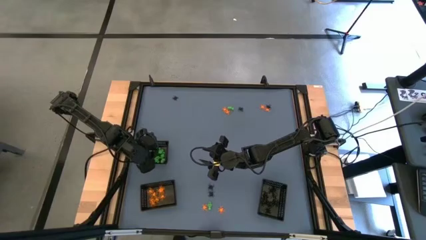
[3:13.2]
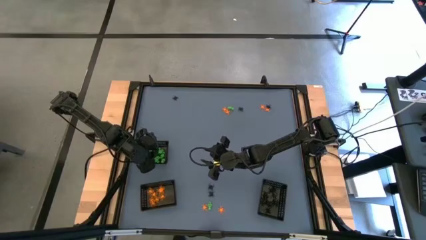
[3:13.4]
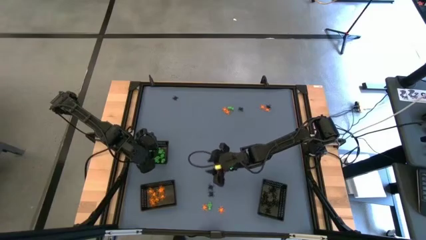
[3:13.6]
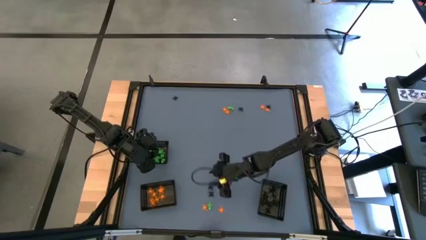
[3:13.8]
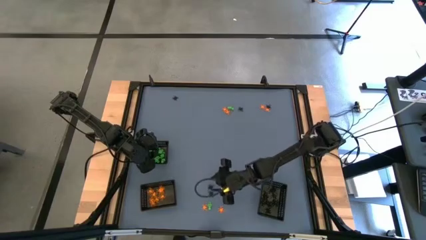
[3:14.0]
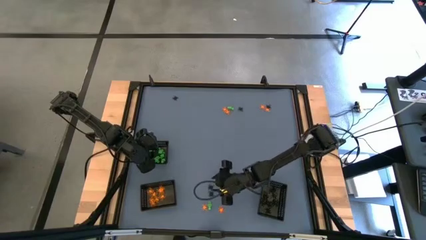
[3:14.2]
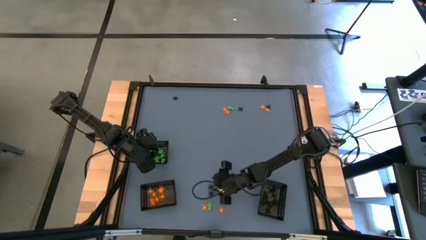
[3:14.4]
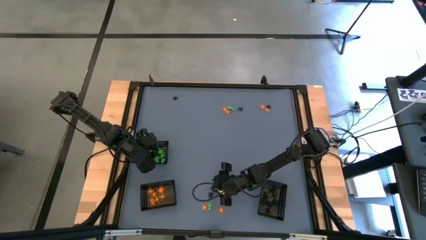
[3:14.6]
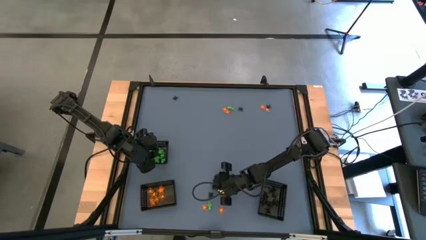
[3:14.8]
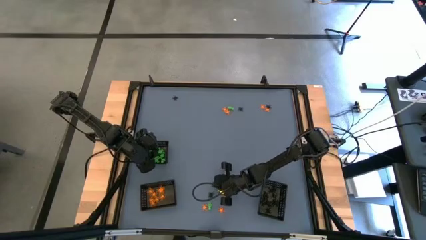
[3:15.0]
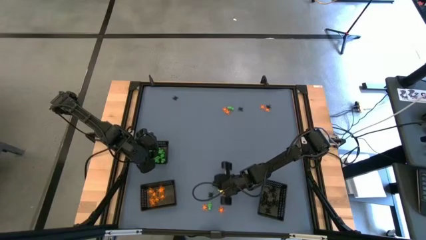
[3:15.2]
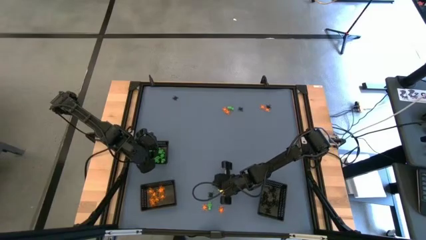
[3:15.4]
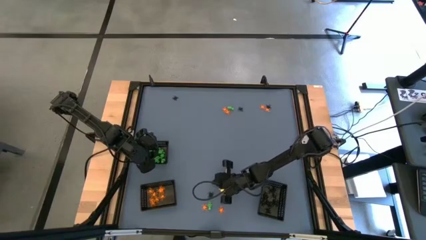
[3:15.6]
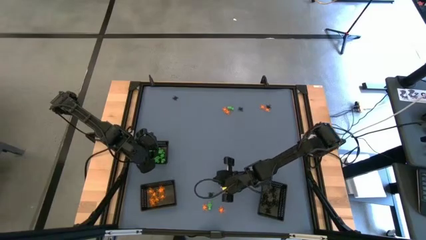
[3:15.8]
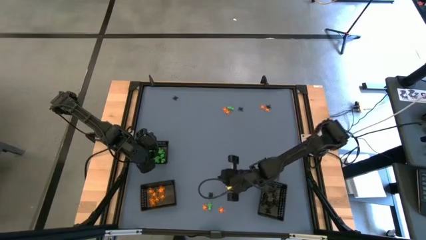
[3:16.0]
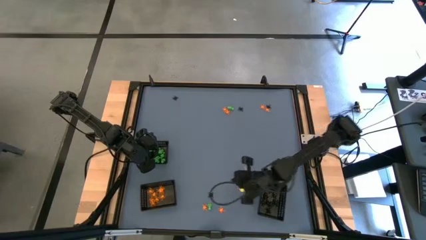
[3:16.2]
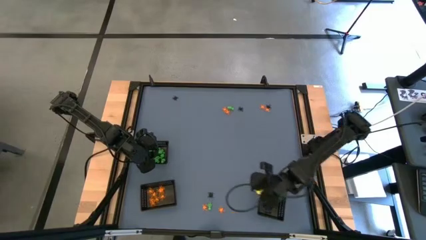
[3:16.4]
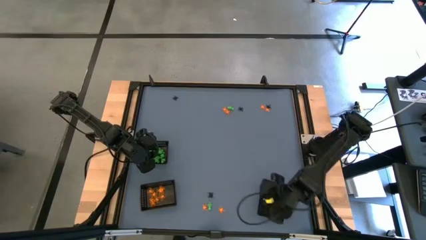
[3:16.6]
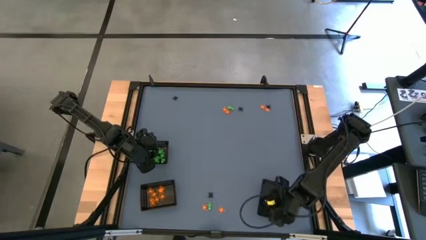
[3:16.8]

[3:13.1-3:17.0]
Task: Sort Halloween decoration
Put the black spider toy into the bottom right black bin

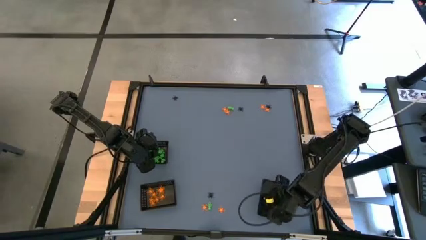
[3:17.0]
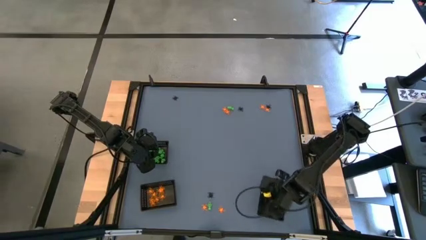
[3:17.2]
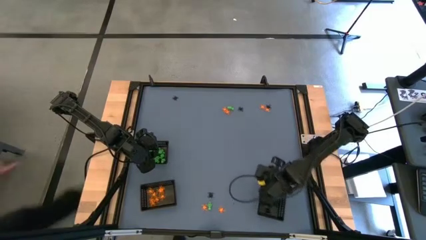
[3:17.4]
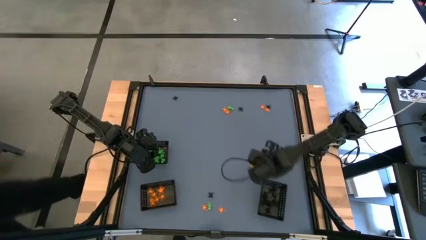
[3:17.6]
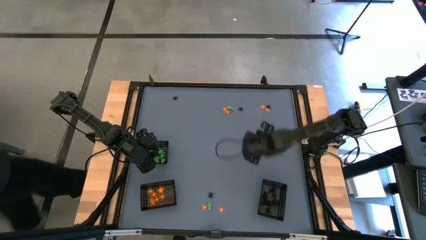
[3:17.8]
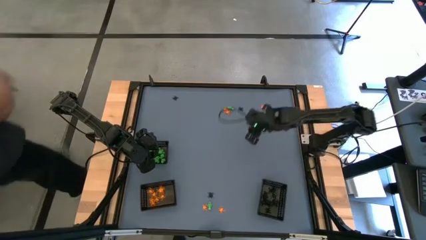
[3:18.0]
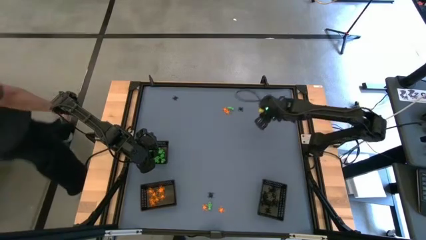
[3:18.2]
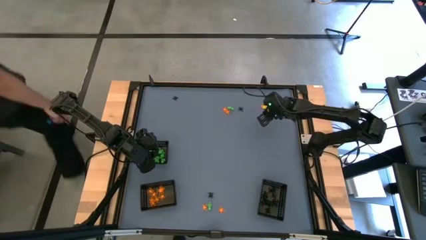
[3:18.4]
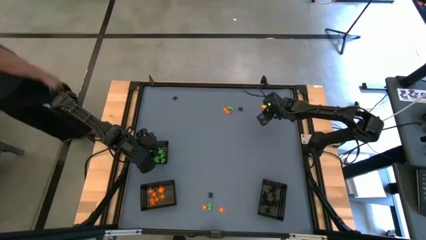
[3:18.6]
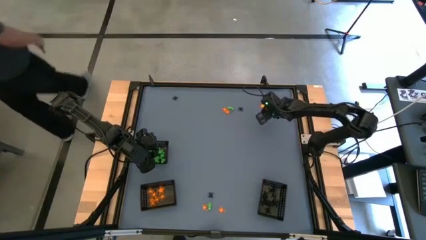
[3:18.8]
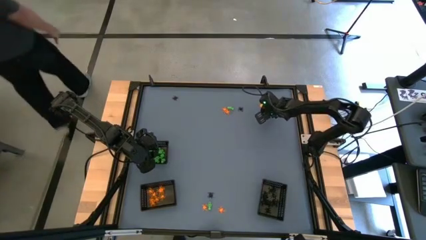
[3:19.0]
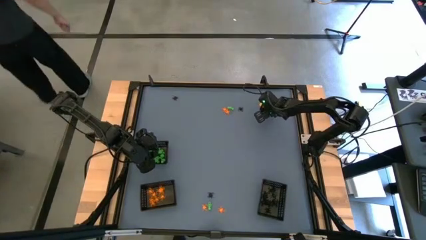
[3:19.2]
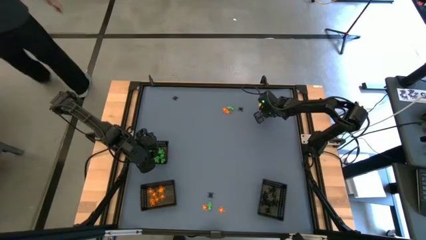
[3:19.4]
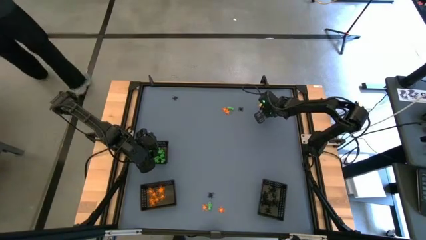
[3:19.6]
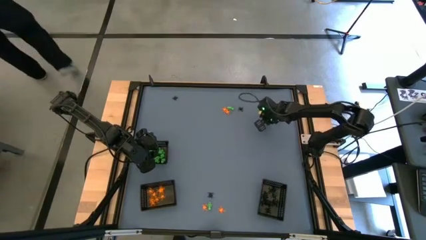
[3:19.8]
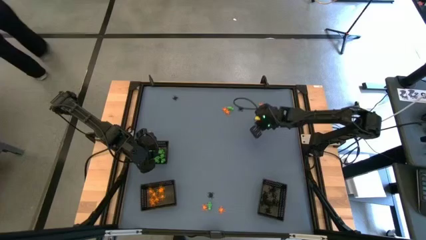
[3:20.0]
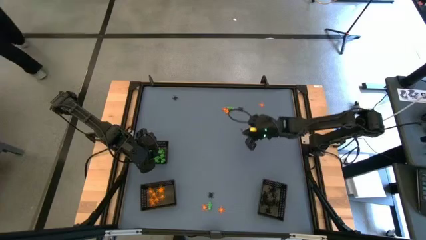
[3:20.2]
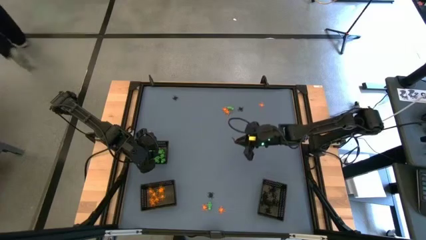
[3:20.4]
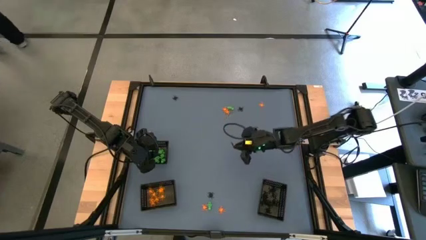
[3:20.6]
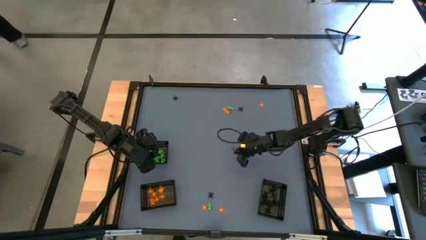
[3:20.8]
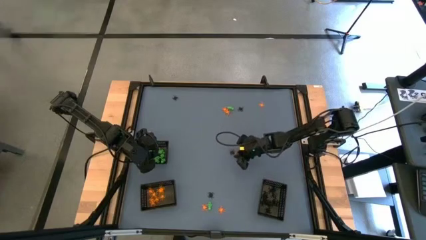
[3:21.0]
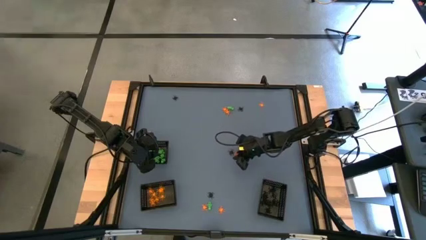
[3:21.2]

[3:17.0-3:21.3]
Put the orange spider toy into the bottom left black bin

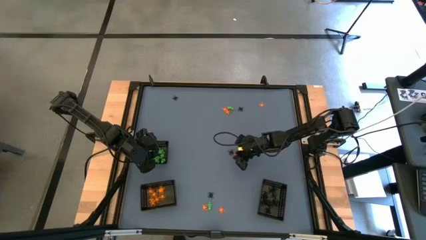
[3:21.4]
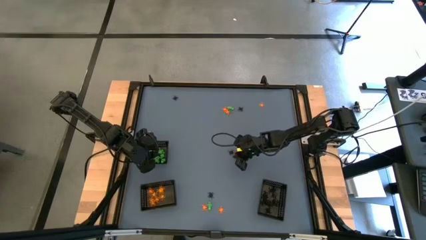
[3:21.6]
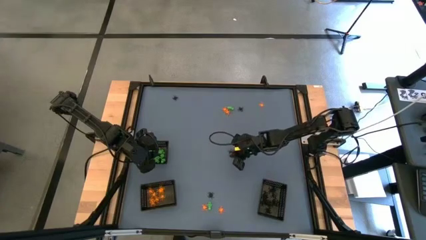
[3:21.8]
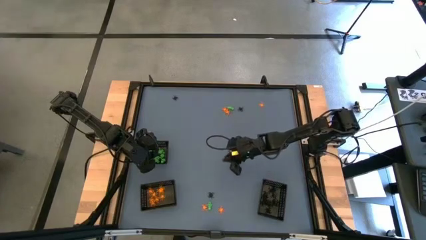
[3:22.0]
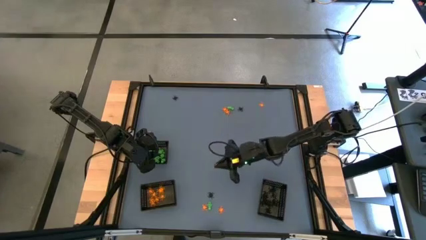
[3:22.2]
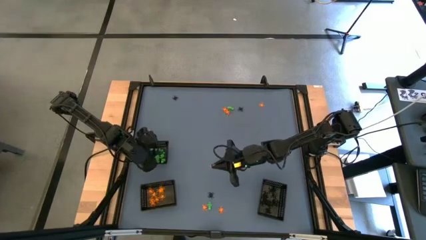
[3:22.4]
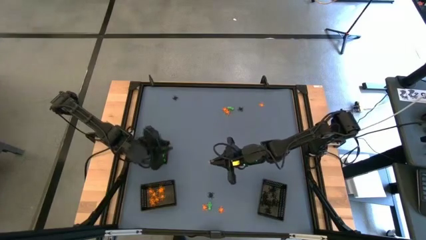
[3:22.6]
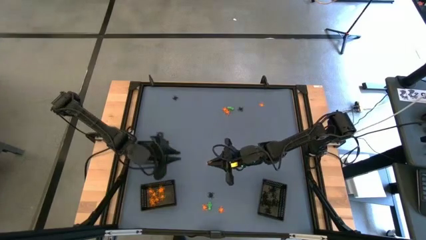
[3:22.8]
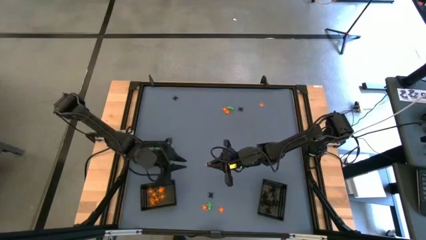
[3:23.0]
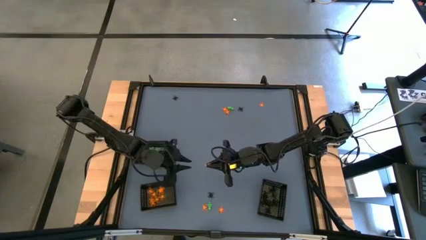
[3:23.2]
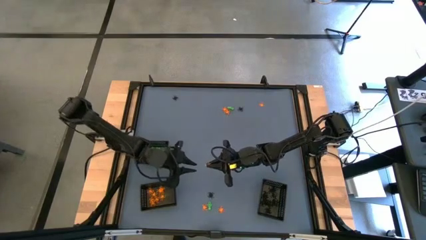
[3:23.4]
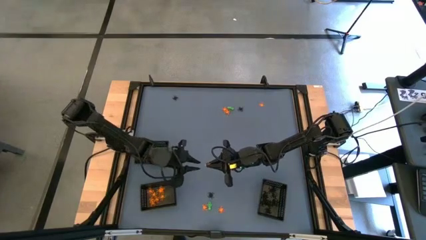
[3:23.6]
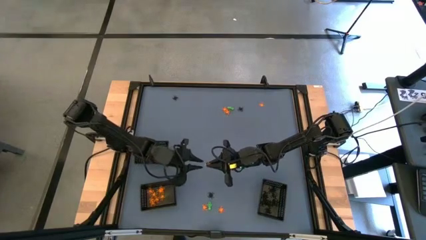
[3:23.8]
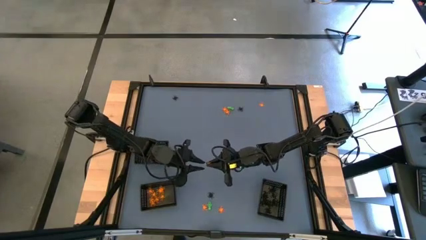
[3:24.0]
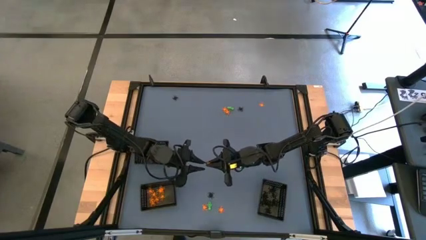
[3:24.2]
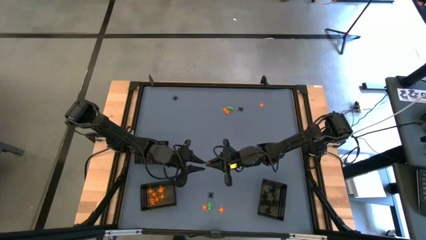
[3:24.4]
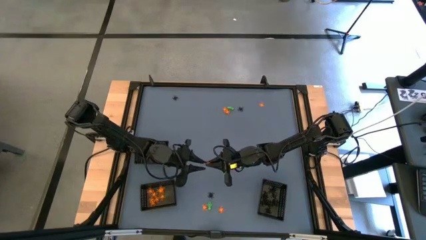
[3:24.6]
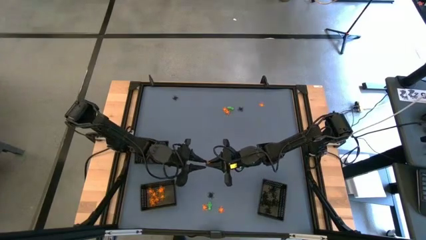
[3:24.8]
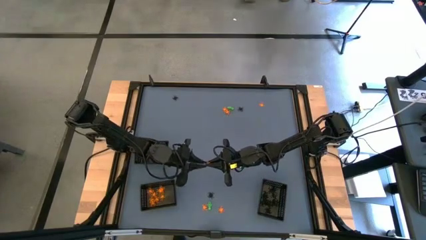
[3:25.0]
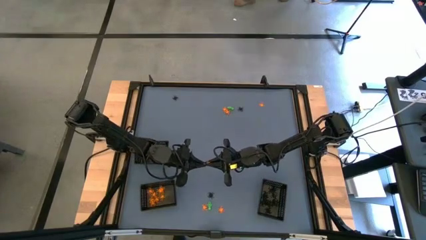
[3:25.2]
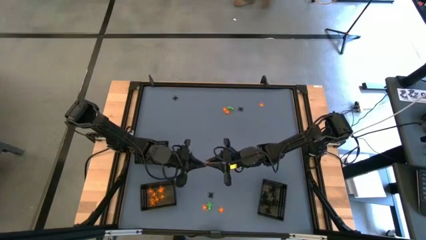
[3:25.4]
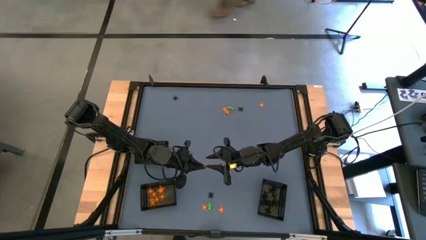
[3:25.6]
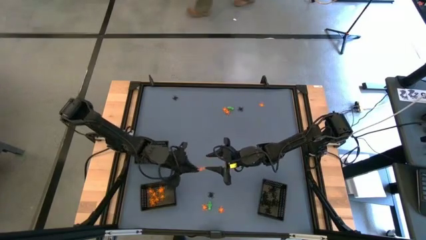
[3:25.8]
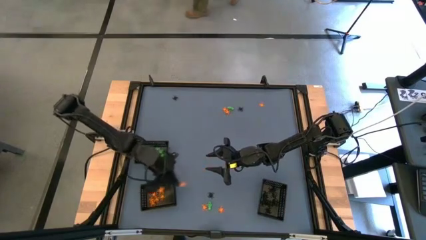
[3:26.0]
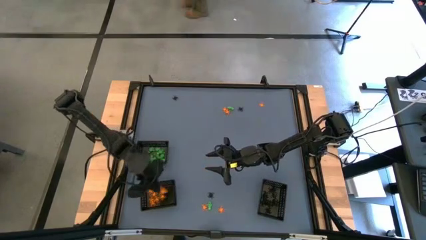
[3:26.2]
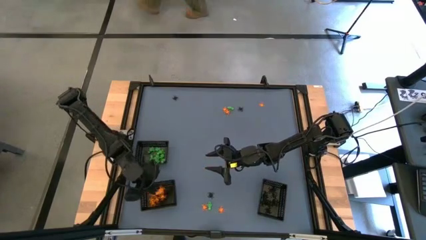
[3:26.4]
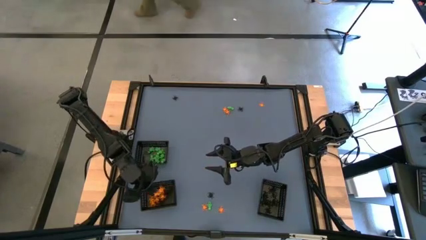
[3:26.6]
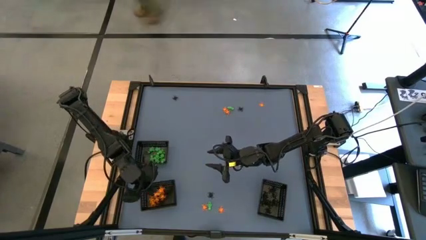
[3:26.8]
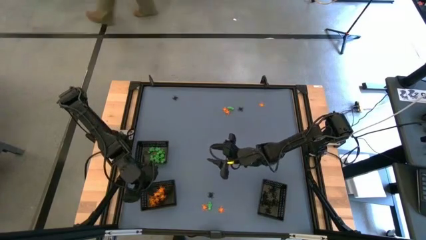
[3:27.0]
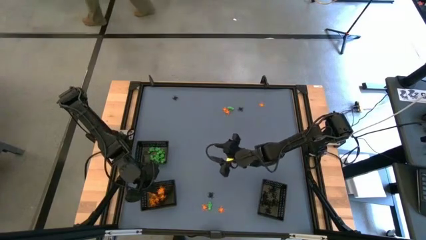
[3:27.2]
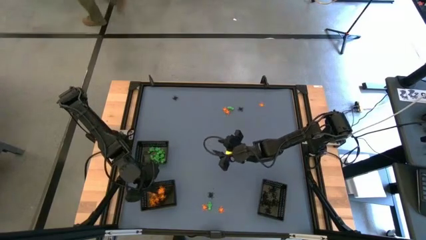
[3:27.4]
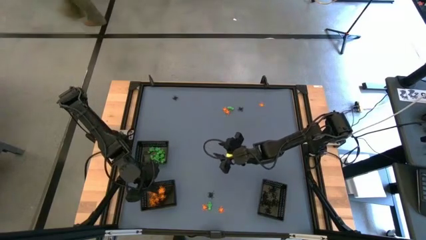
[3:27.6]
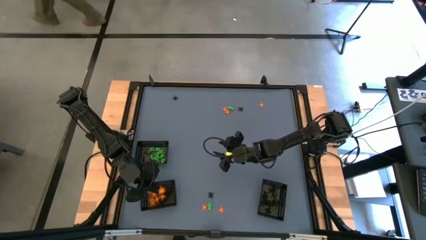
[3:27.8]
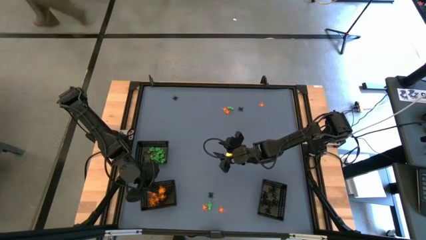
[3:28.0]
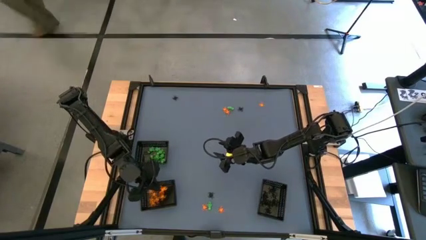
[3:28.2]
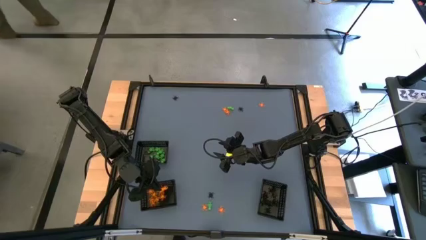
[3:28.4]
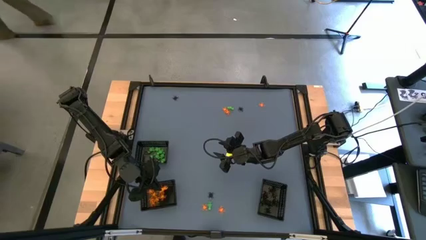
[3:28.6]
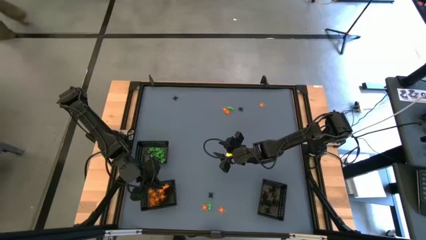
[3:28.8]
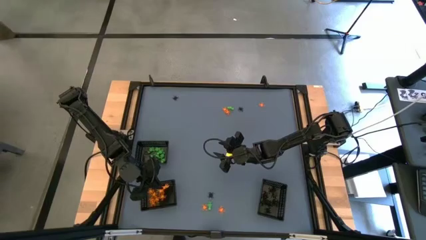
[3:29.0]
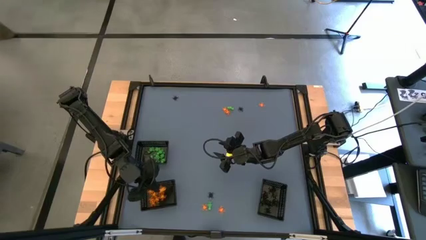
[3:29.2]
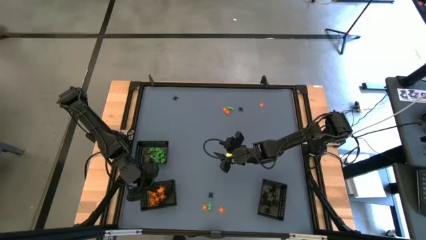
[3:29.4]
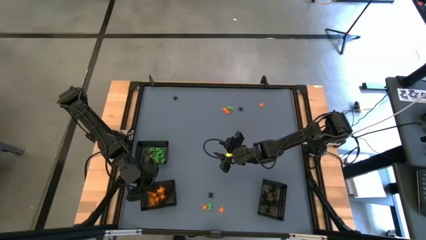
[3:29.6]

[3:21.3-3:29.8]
Put the orange spider toy into the bottom left black bin

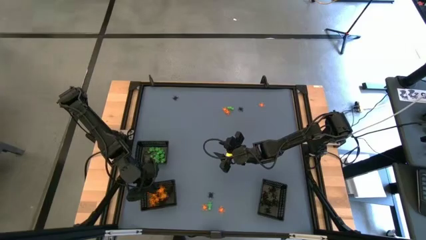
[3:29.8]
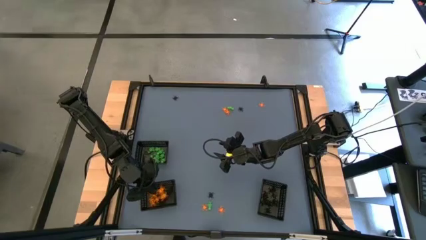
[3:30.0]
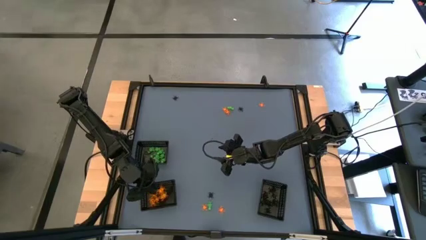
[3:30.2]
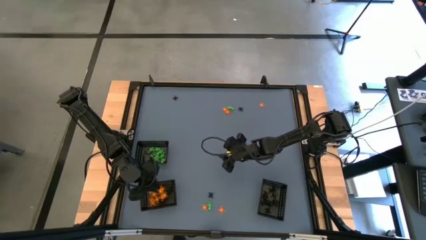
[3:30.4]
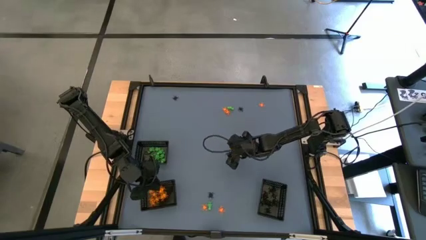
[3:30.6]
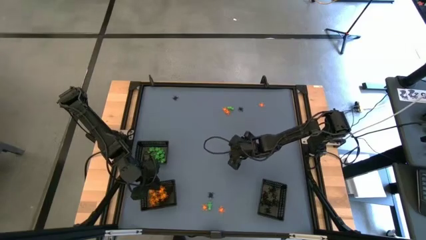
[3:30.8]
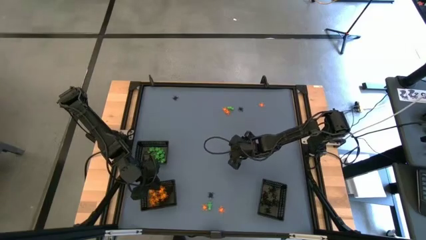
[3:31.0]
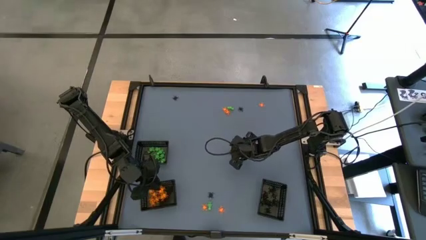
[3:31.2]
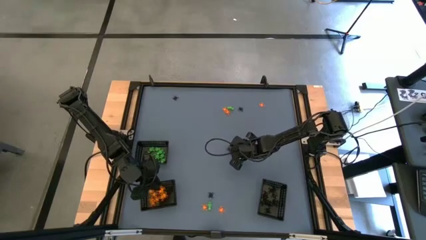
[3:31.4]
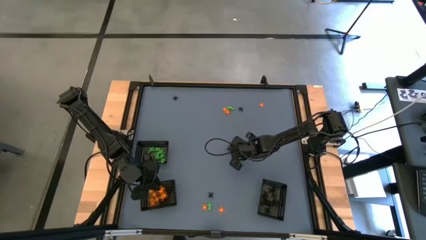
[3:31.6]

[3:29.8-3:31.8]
Put the black spider toy into the bottom right black bin
